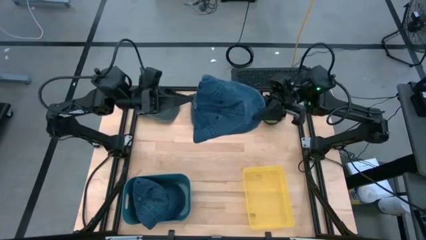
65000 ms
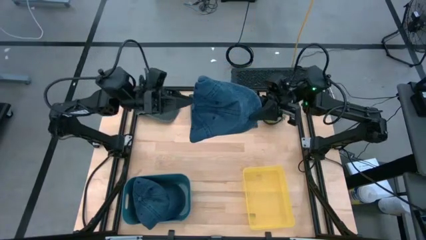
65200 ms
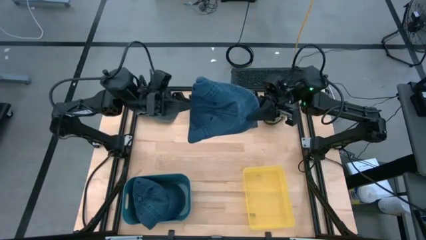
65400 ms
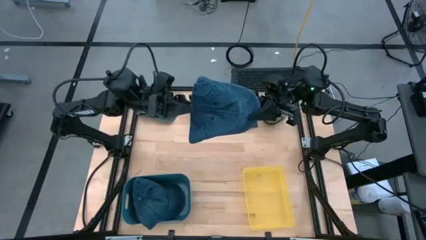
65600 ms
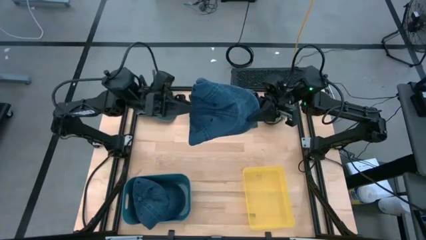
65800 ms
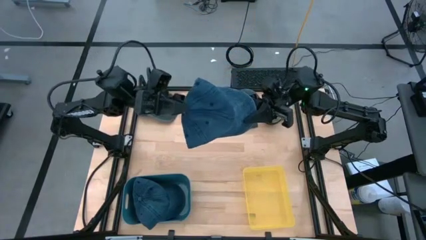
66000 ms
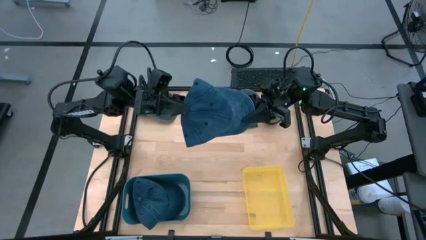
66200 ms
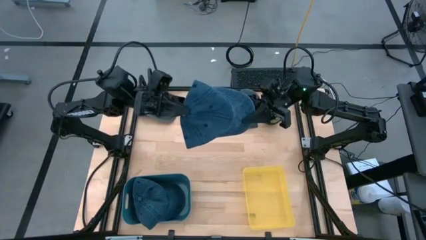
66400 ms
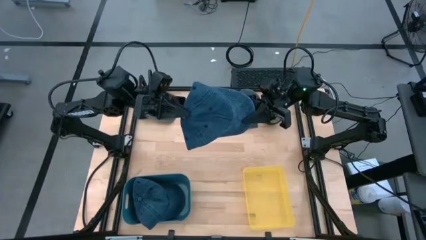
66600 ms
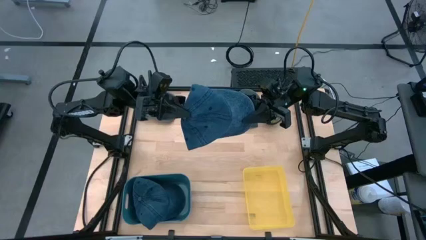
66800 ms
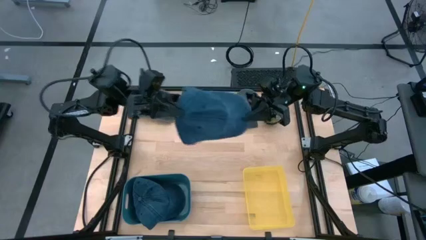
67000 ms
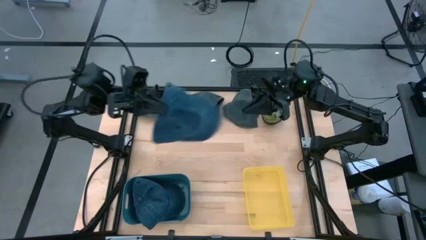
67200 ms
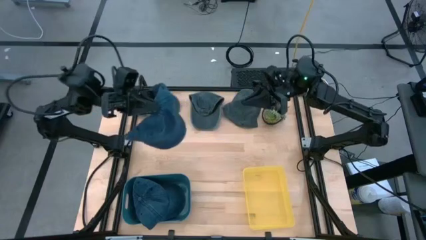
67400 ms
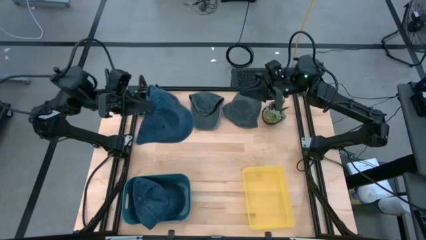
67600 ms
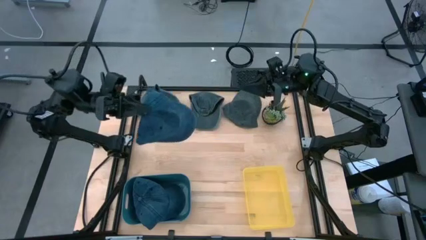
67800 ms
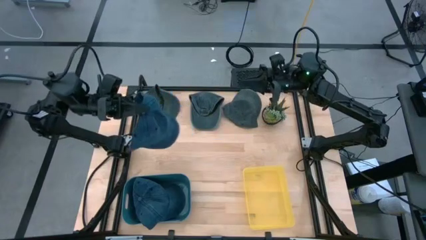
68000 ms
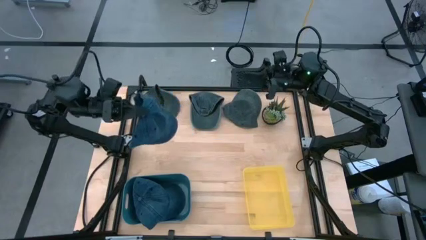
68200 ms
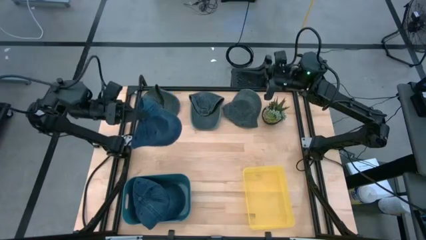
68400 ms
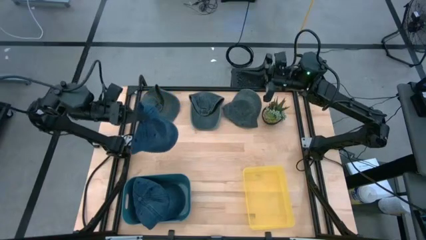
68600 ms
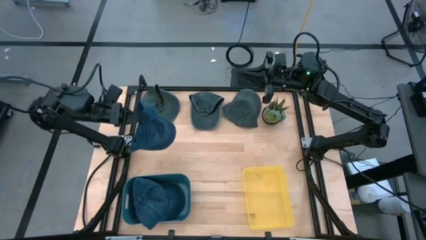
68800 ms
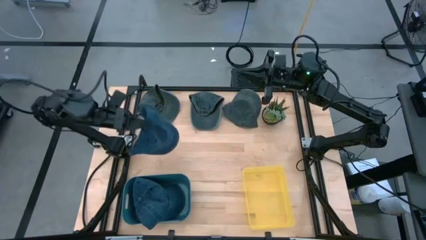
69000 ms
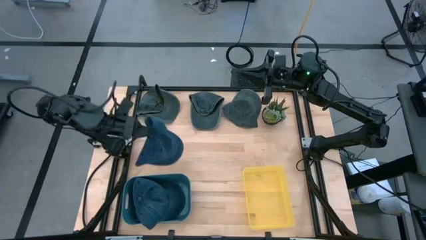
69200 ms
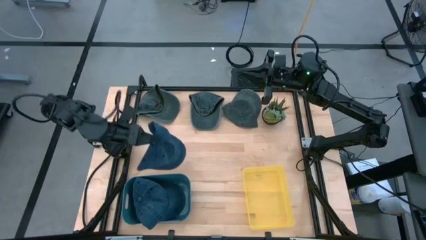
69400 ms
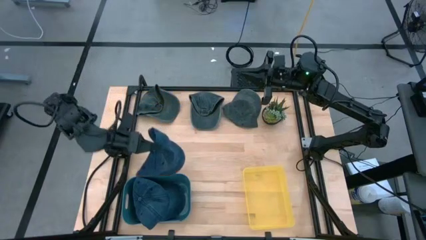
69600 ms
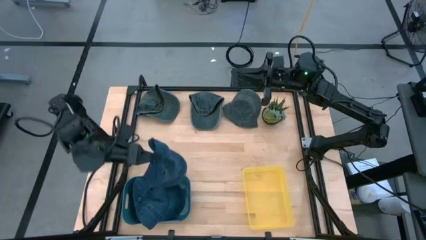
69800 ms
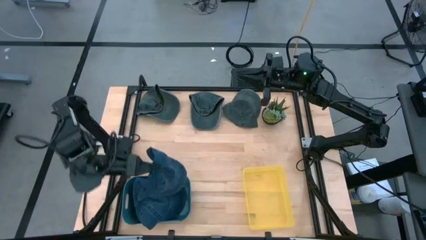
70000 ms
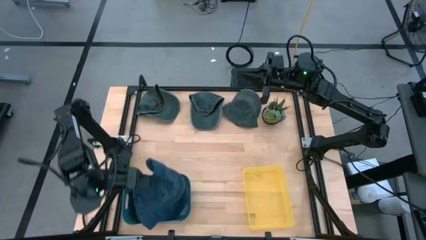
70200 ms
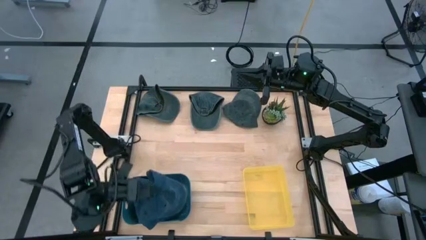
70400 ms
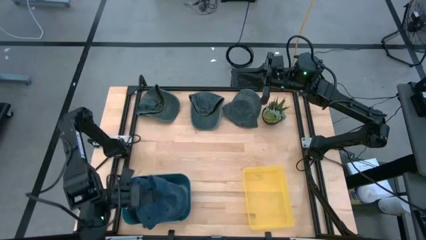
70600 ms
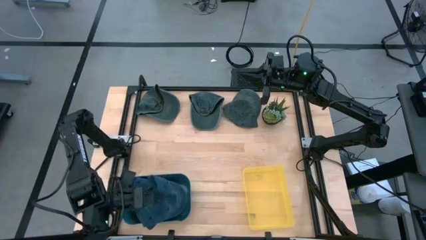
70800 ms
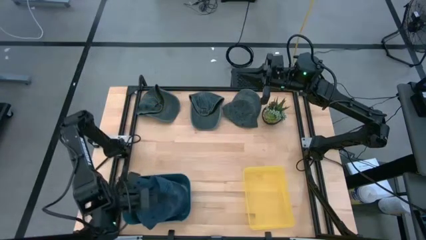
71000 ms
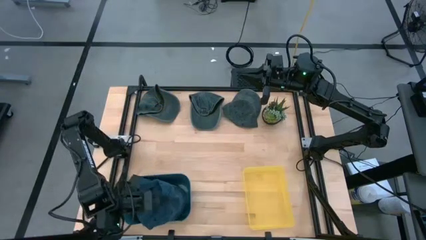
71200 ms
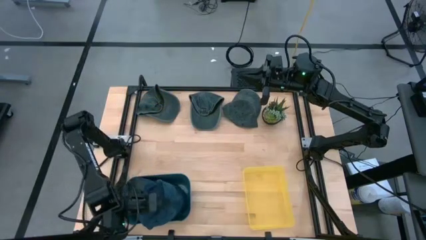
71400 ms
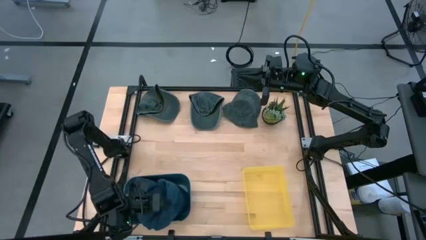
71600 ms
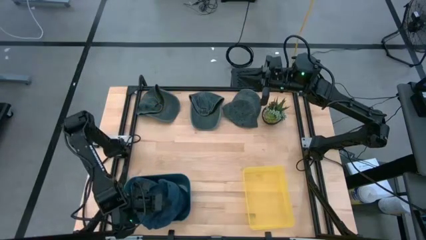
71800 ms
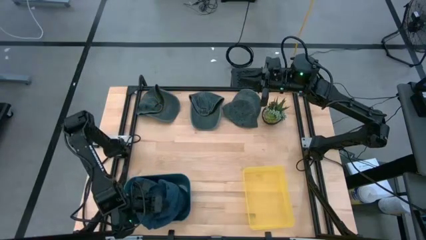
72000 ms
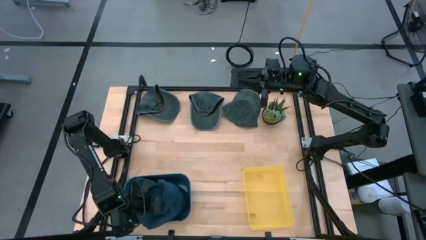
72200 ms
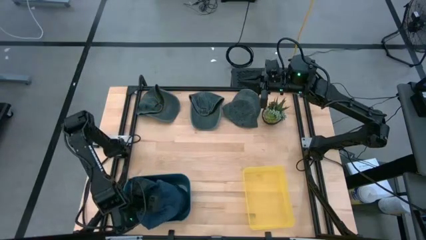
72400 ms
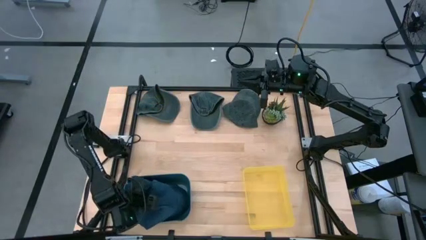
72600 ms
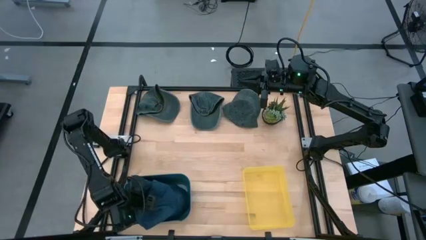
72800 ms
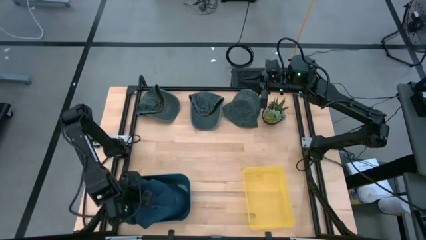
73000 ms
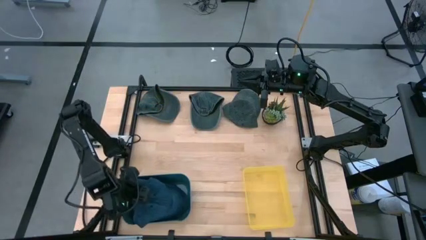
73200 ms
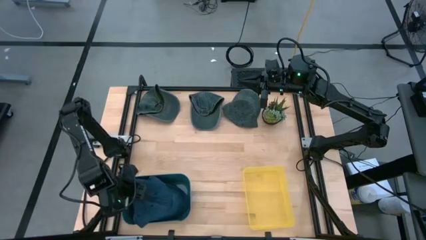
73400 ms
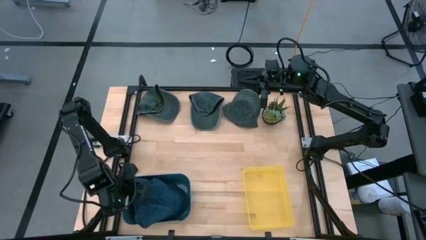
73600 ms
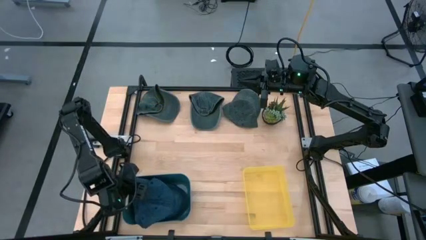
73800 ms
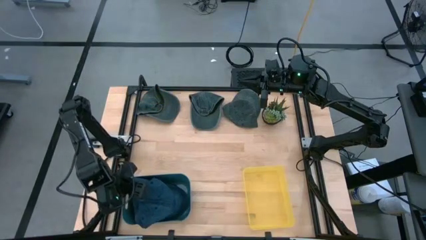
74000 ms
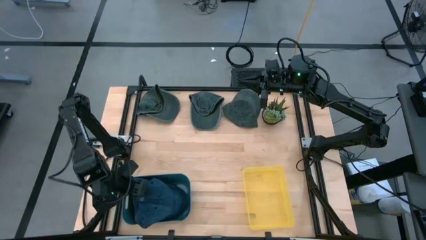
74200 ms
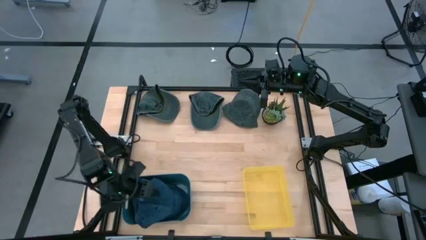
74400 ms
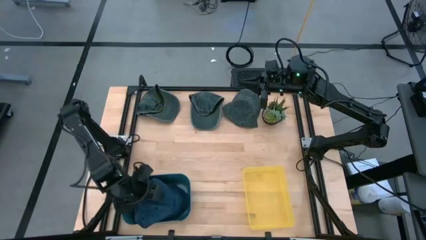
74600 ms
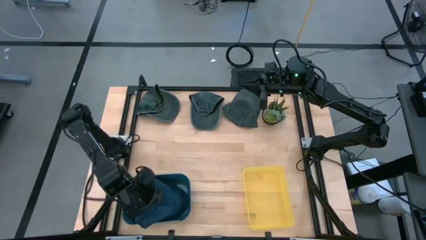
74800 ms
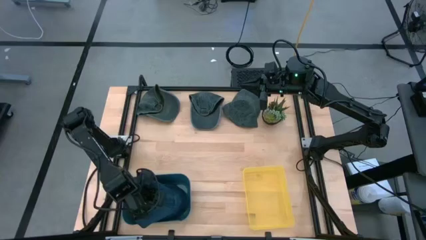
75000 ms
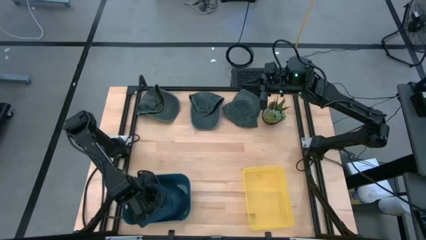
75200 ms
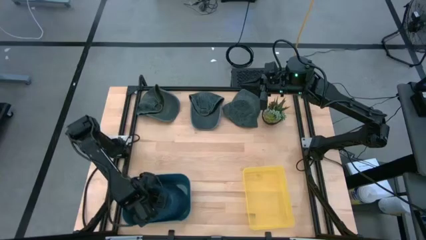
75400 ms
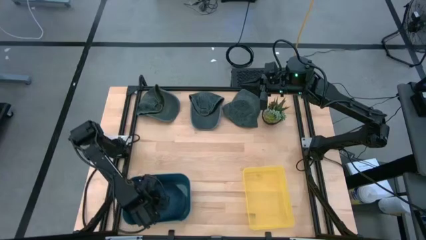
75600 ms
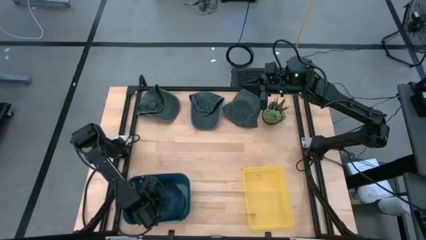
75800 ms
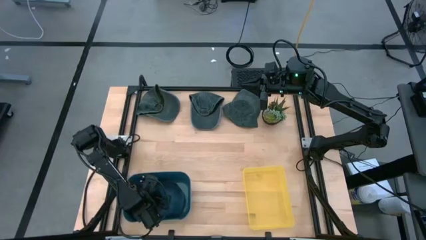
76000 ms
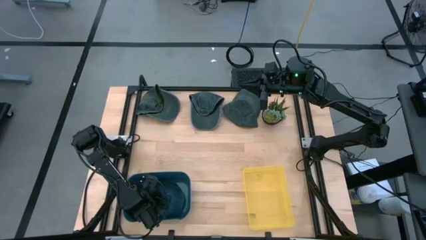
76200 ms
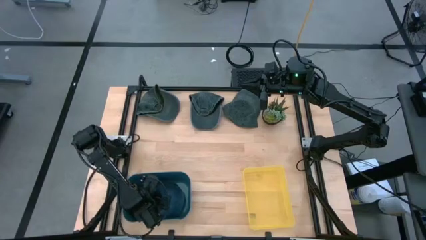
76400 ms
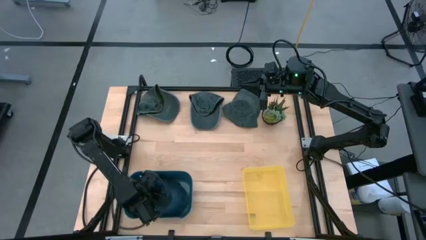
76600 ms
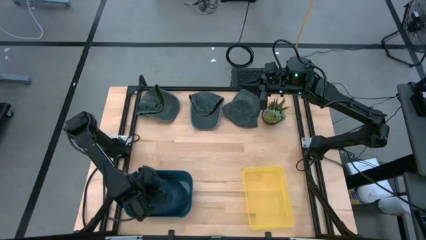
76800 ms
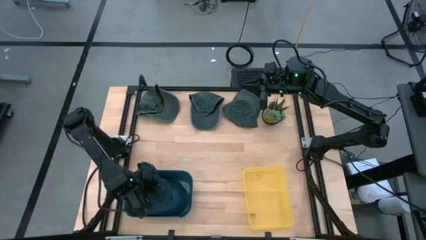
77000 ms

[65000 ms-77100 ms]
Task: Pick & Place hat
Put the dark blue cap into the blue bin

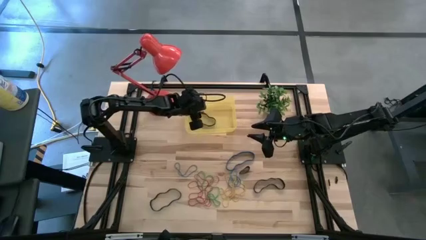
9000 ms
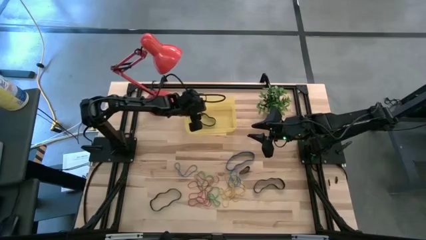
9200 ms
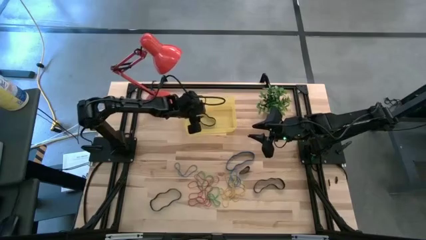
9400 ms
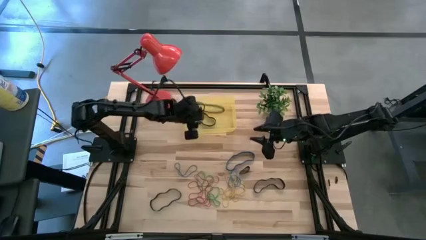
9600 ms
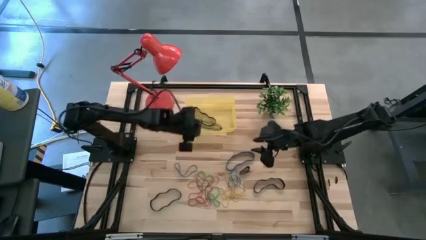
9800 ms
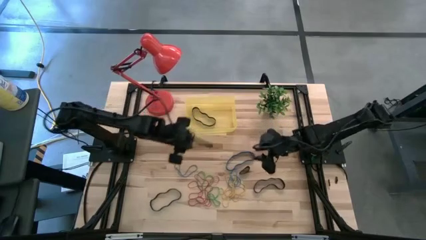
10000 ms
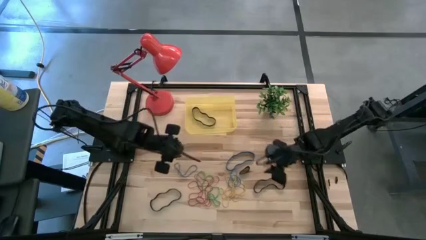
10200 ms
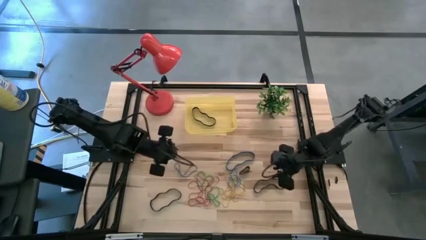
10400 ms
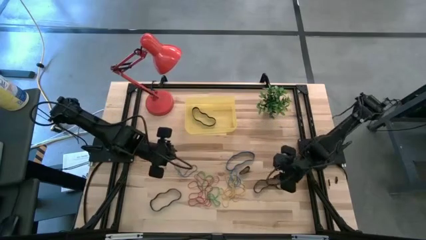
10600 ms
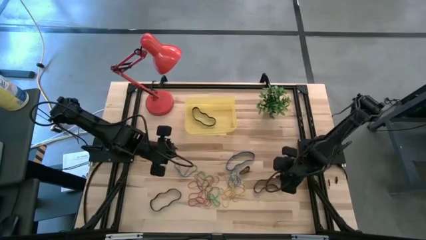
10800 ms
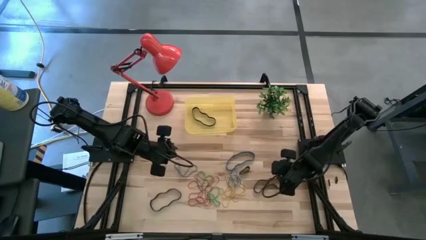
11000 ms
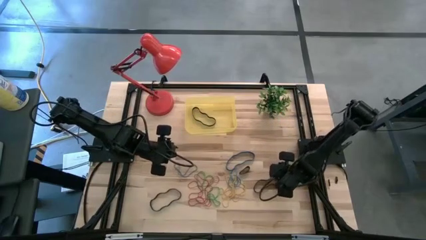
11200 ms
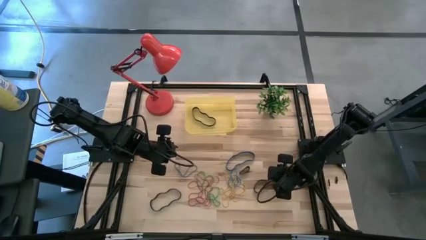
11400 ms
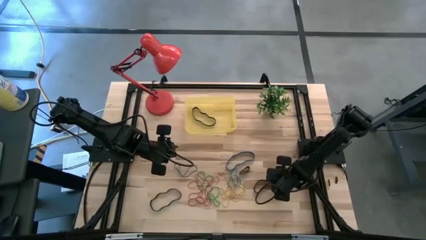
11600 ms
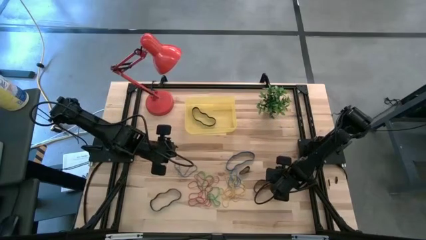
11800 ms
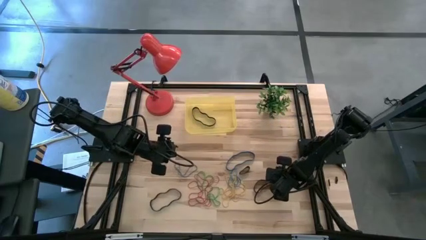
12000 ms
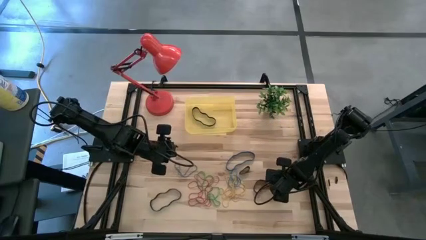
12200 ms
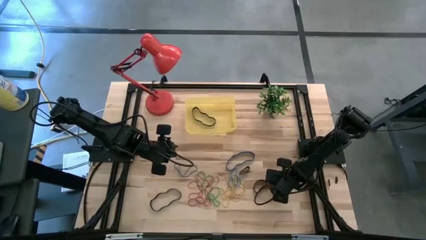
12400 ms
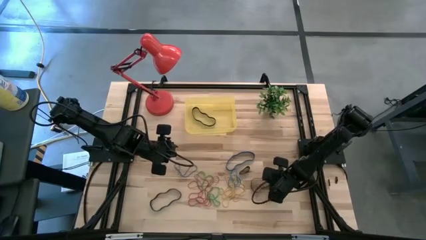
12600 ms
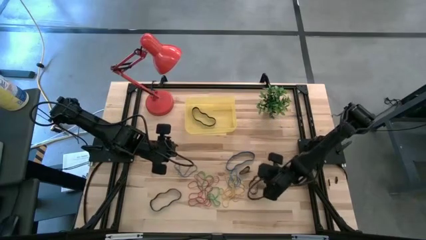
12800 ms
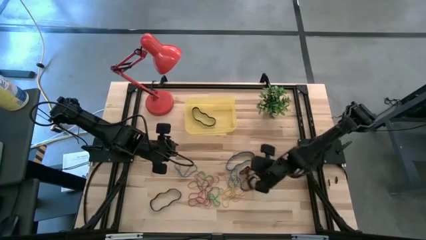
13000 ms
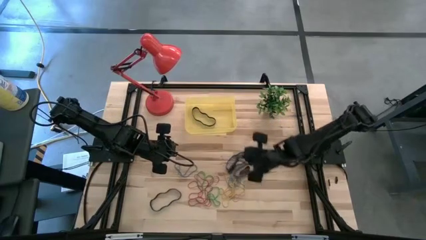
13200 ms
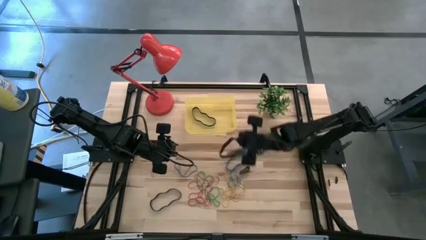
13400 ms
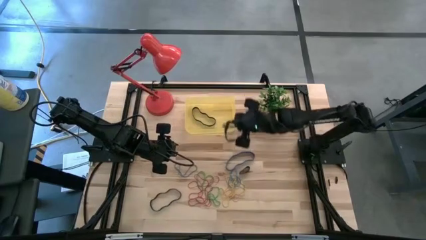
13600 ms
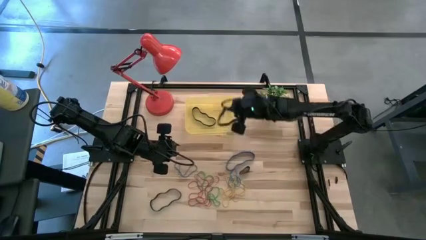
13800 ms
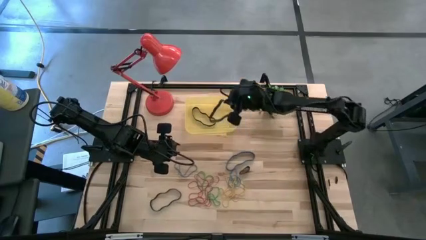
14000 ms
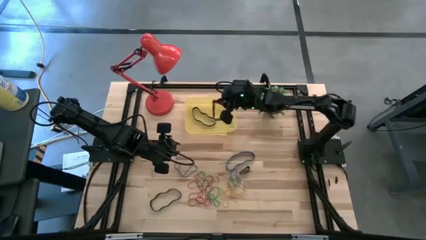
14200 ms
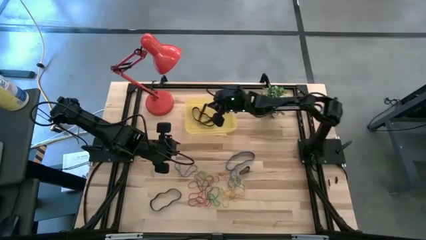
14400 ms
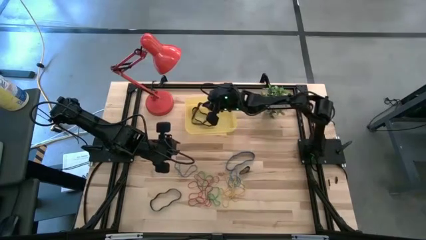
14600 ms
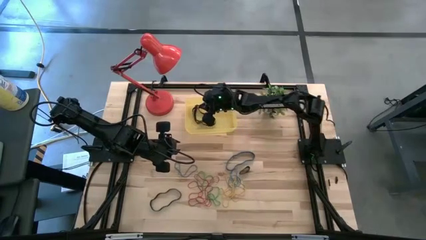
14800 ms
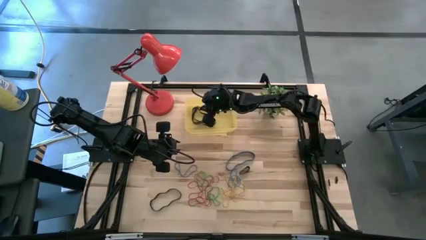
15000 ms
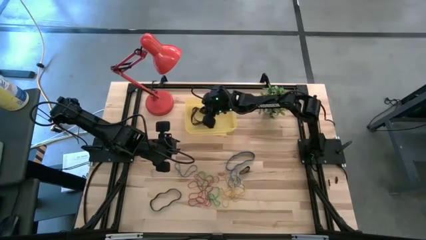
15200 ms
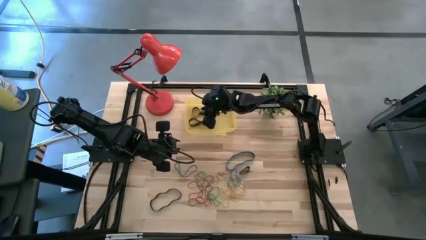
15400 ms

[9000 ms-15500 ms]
Task: Pick and place rubber bands into bin
Put the black rubber band into the yellow container
